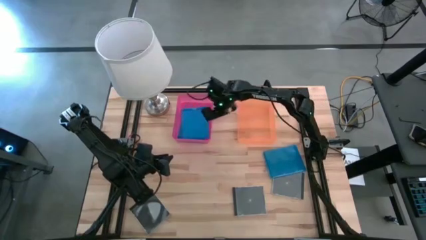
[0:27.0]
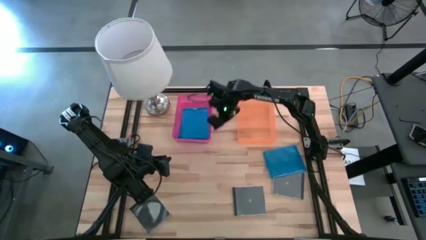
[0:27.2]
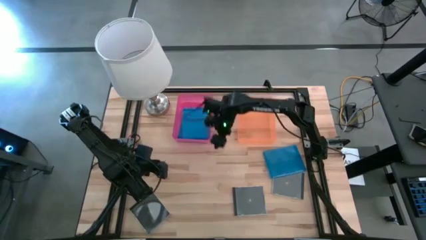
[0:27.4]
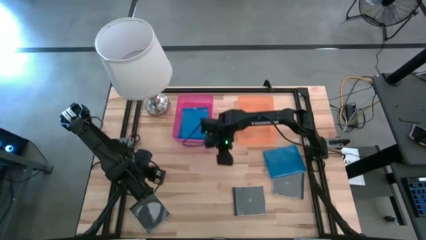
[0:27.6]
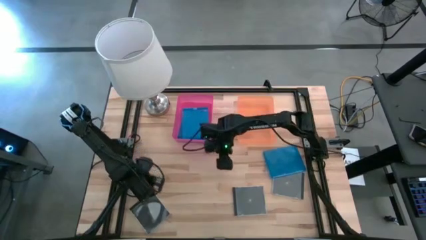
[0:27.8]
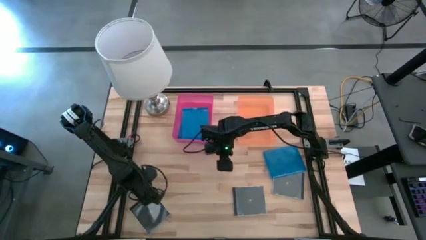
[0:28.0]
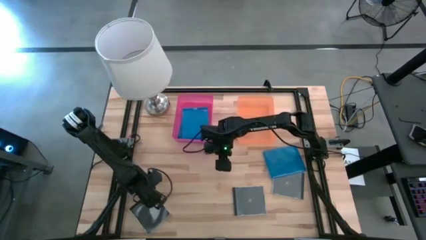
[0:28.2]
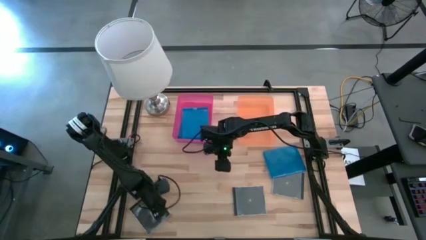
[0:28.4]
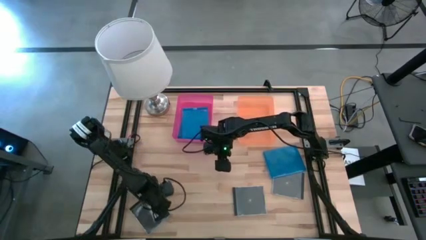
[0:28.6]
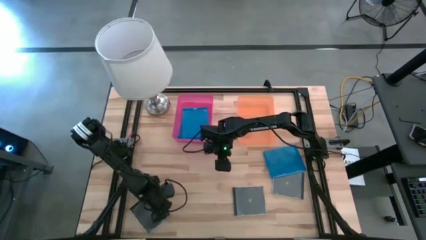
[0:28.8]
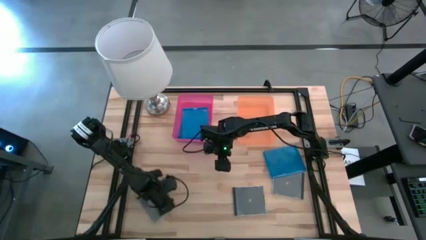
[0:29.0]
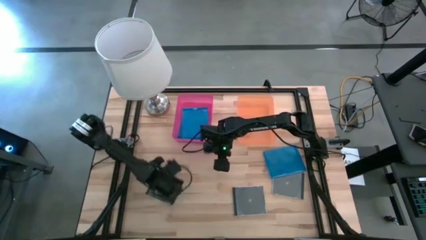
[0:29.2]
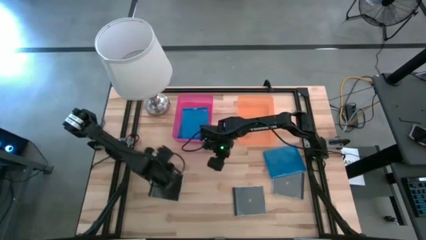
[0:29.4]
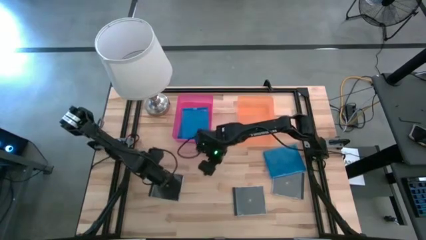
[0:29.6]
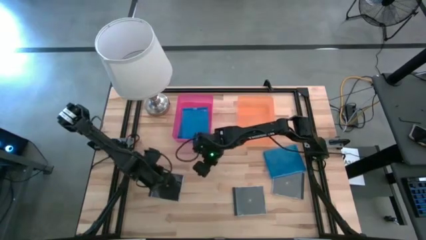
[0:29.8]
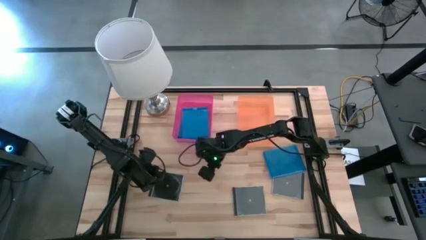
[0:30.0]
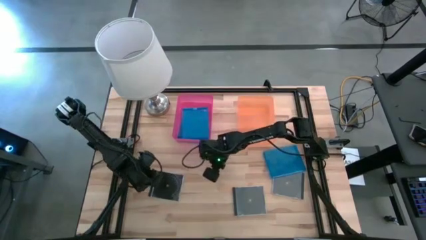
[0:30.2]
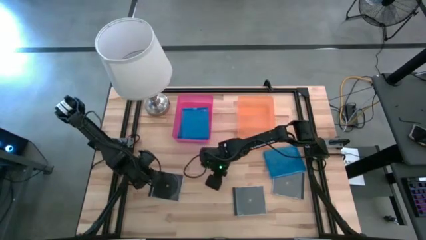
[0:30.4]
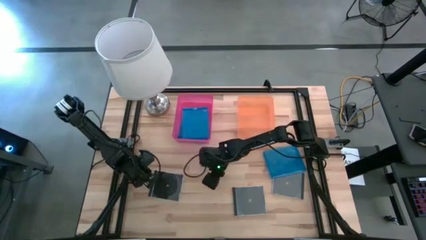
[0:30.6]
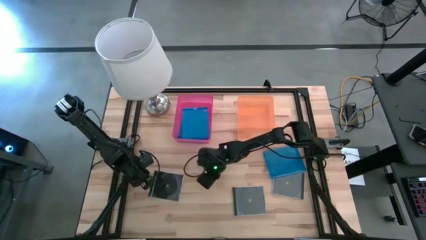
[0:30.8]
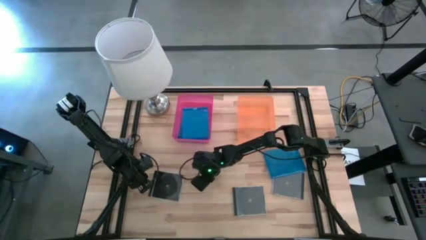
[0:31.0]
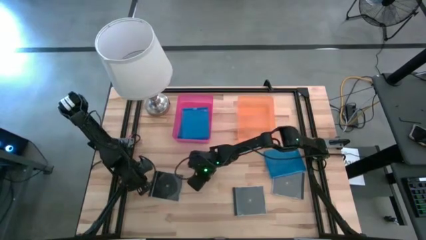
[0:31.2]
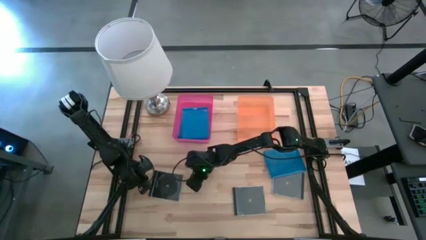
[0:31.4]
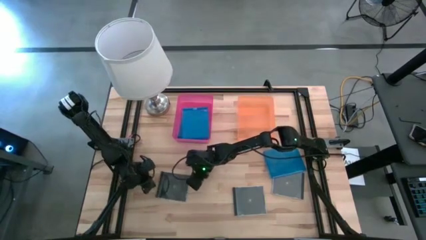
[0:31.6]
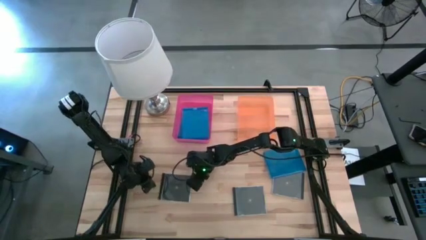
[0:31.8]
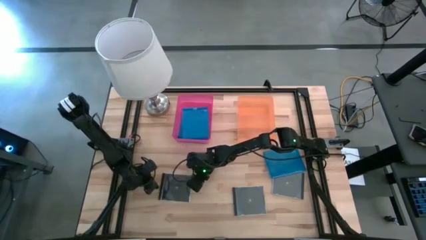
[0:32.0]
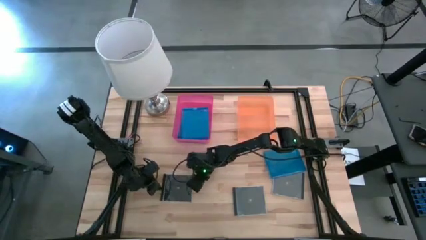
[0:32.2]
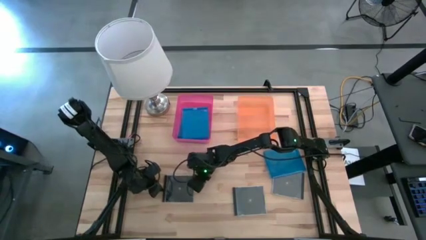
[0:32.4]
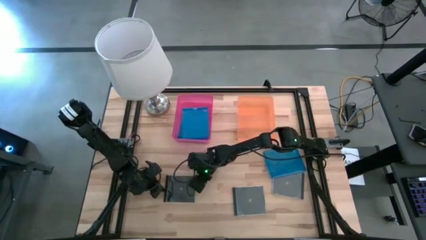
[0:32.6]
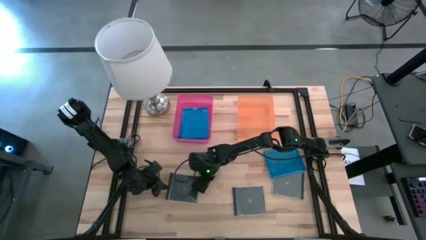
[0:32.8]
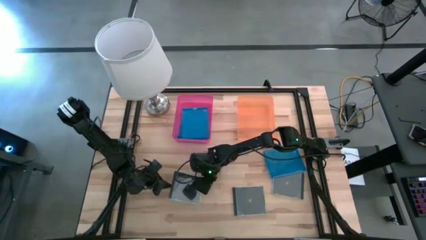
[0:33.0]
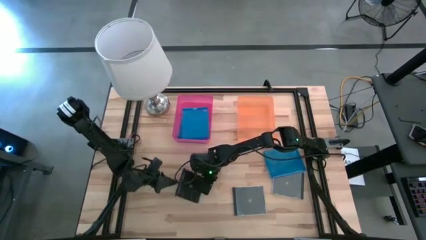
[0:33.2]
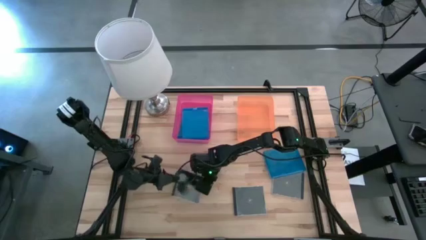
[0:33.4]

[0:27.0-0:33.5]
Task: Pick & place jewel cases by type
Put the left black cd case into the orange bin

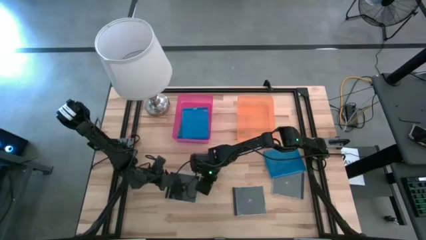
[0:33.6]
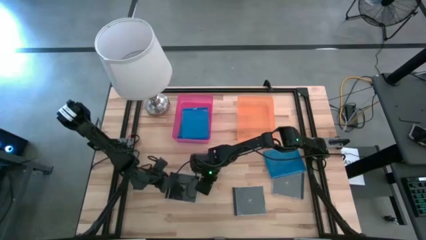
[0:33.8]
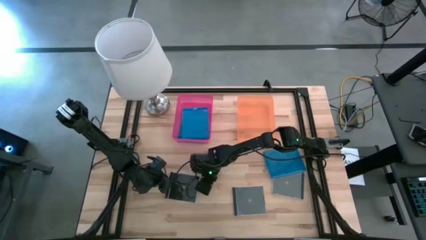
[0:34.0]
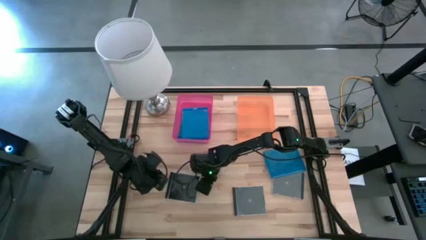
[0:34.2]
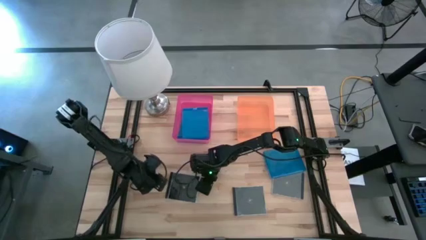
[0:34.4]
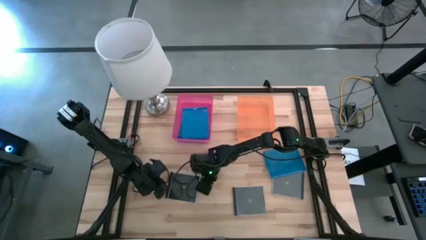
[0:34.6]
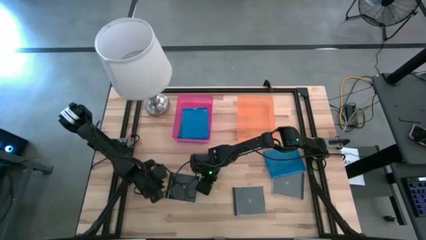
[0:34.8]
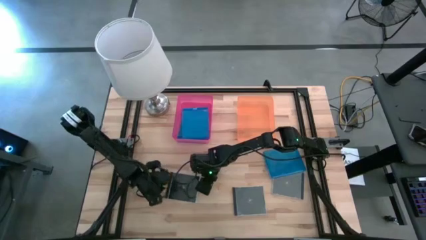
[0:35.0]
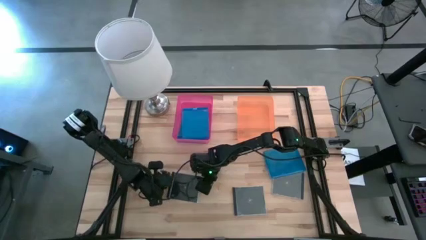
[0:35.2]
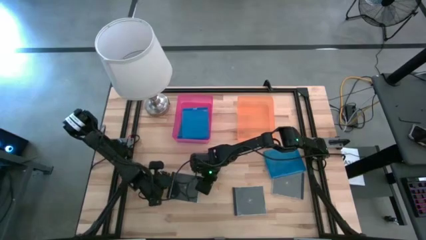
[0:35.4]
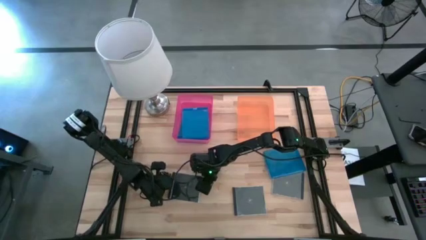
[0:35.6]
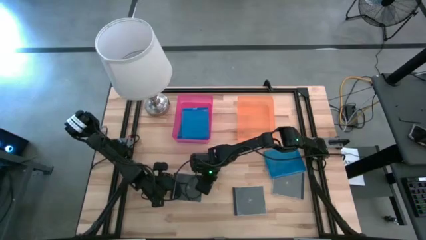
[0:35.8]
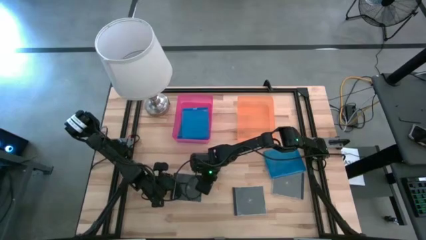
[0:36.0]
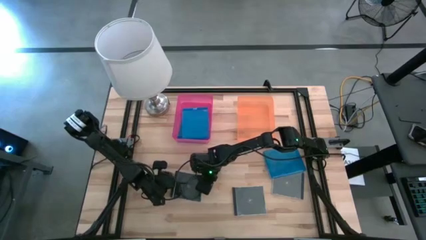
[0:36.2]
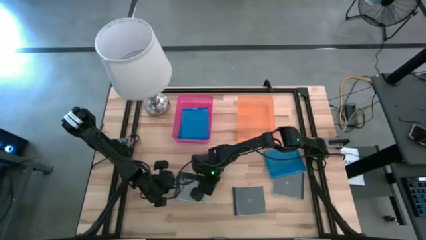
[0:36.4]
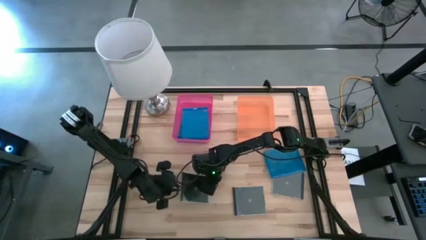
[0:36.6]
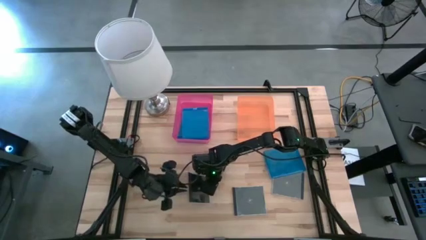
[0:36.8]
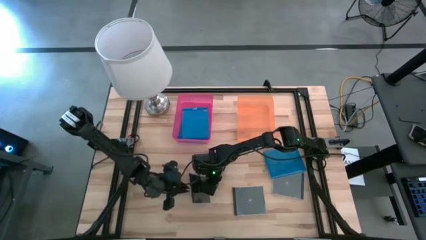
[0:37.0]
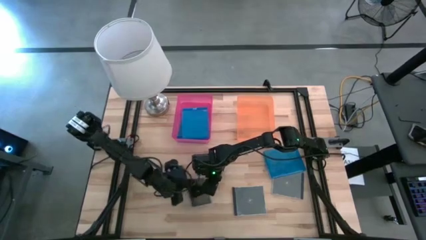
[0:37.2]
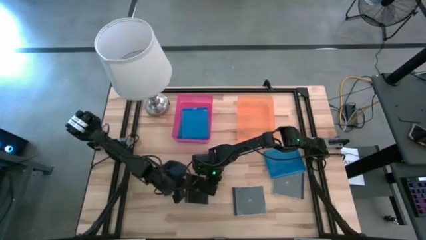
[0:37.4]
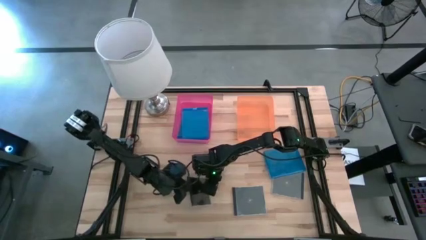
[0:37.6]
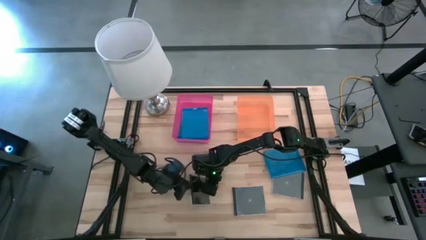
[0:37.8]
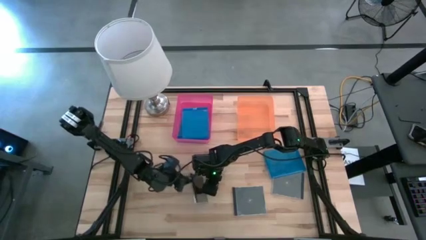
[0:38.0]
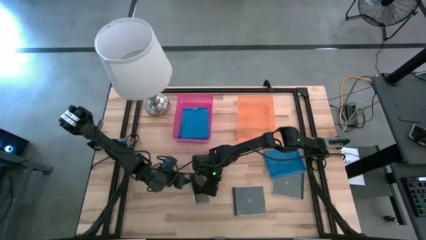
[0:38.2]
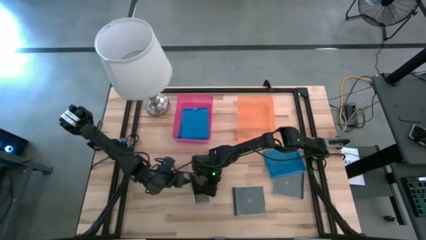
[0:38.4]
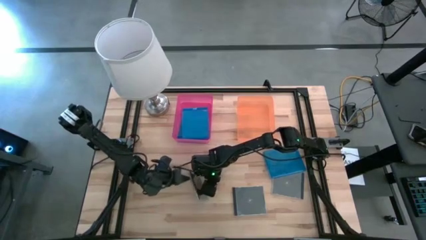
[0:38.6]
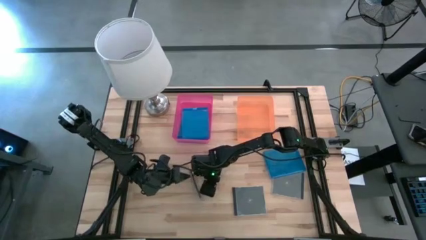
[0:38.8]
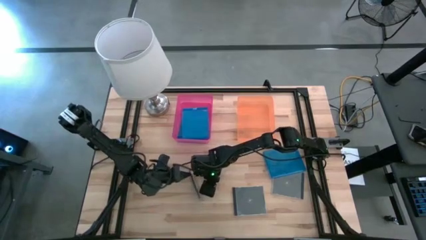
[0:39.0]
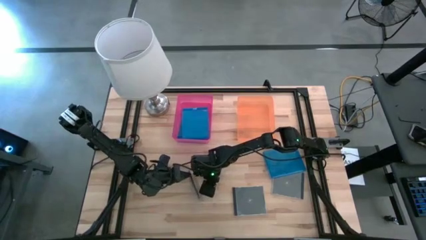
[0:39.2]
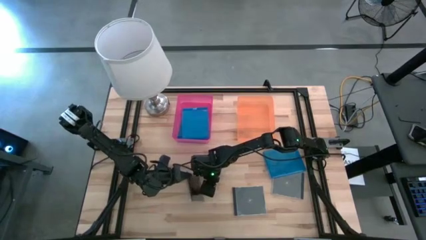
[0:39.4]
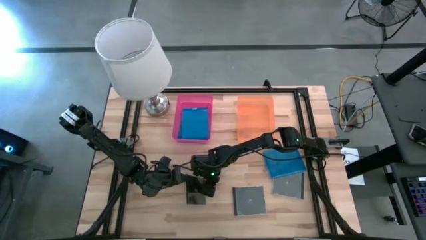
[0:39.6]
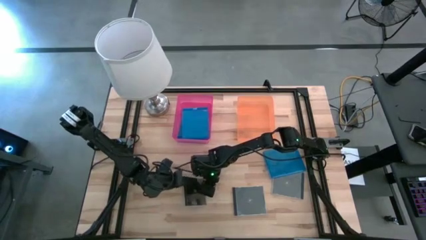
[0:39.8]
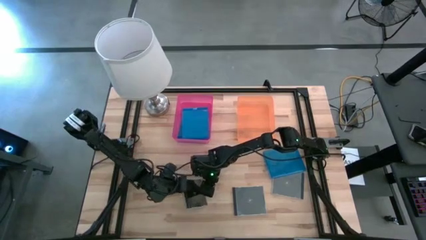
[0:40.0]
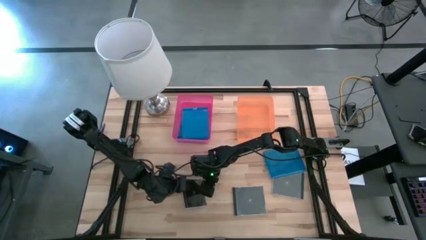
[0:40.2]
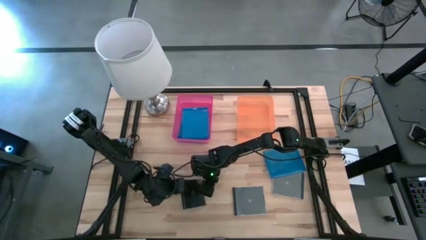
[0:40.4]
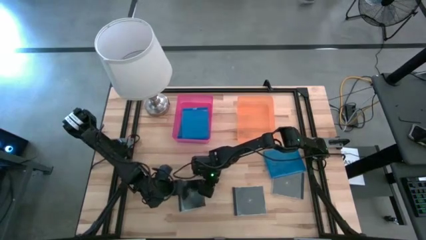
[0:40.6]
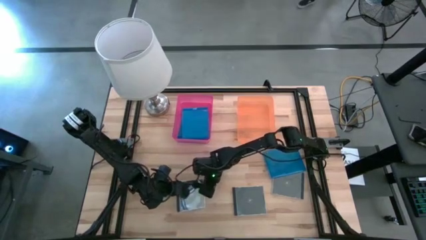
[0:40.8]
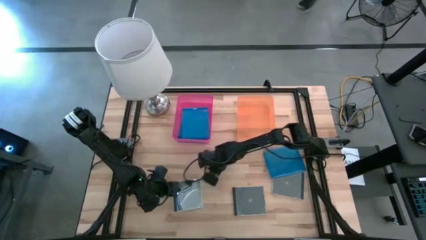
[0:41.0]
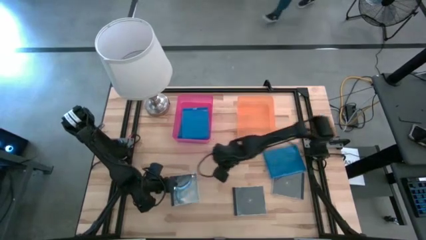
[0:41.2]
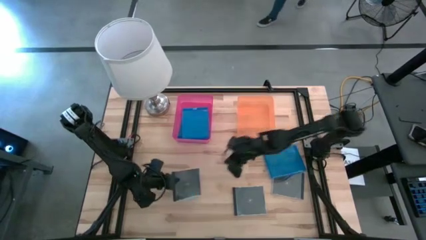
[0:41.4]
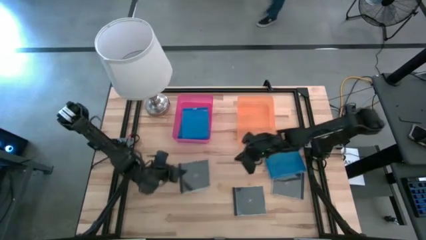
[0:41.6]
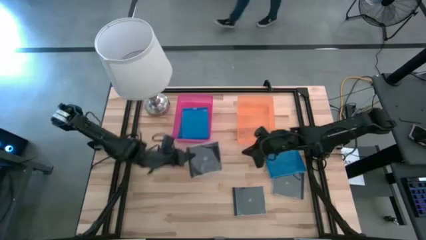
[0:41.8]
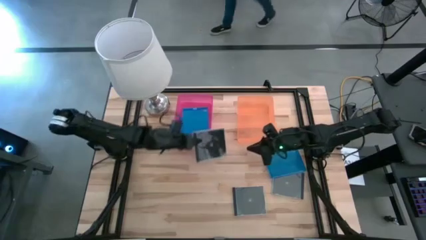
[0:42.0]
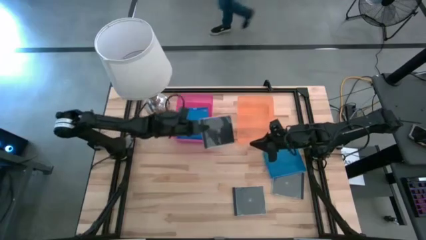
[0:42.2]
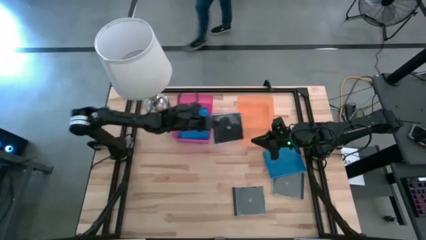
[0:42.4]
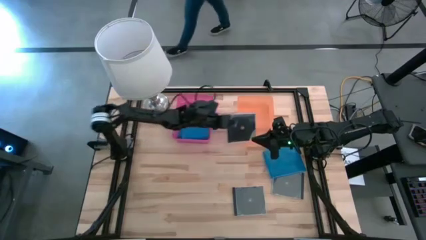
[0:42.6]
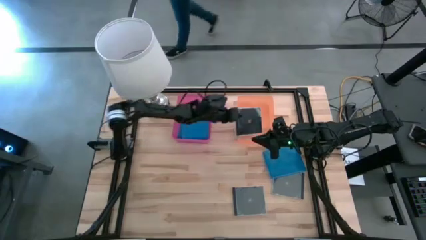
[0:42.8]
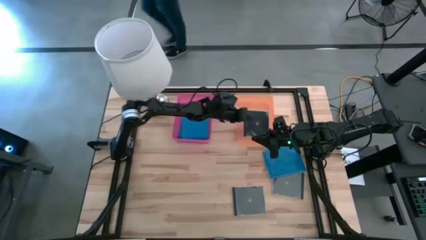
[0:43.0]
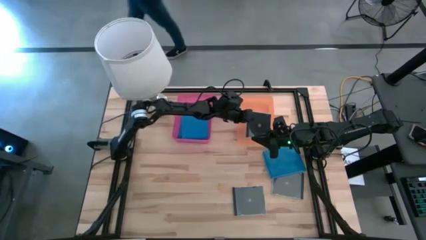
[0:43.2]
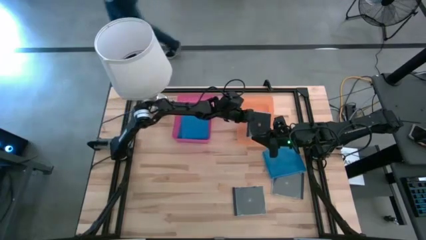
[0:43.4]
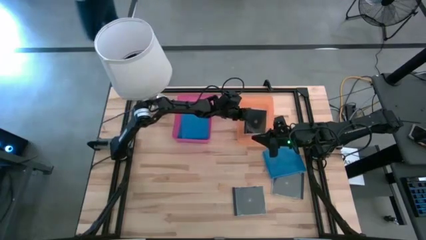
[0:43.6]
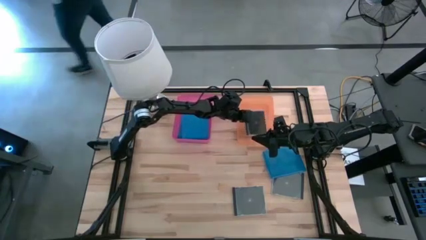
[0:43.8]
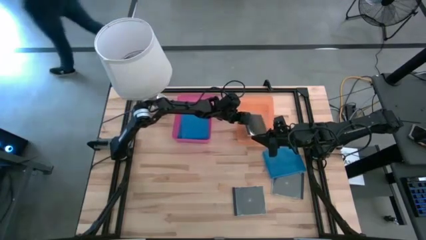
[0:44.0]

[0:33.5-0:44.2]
Put the left black cd case into the orange bin
